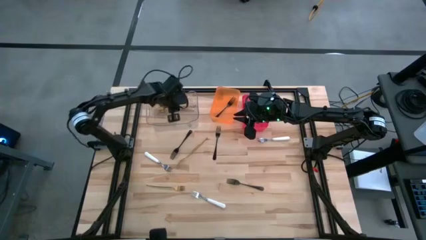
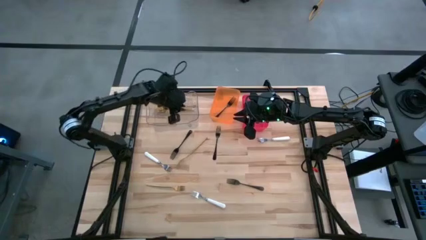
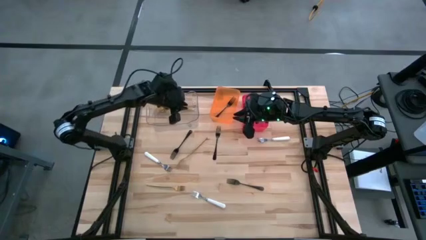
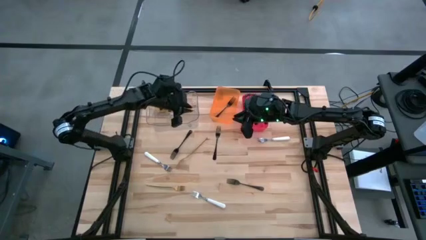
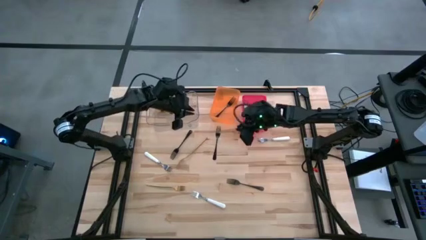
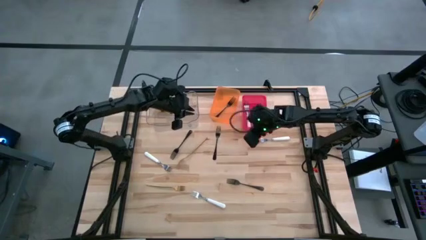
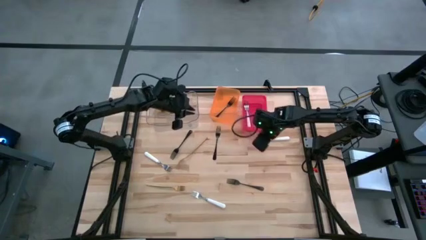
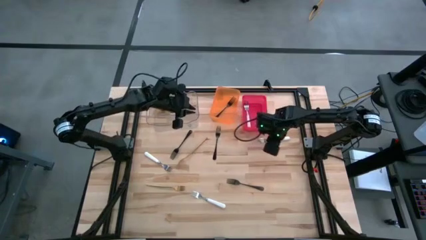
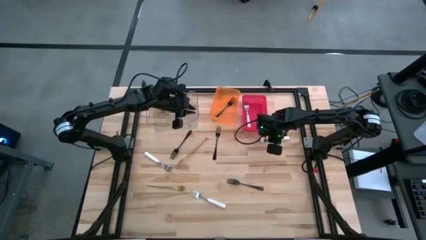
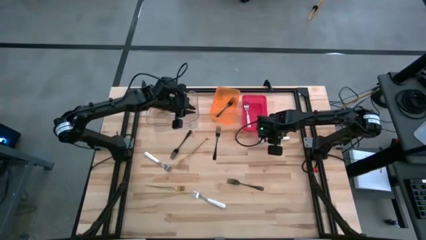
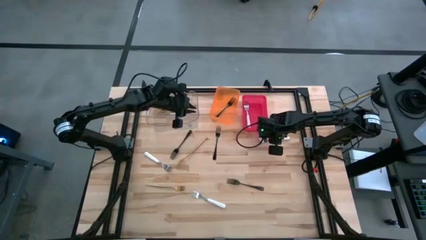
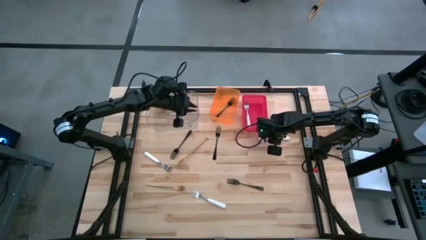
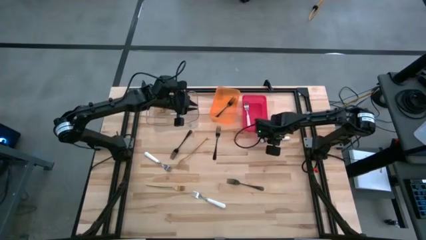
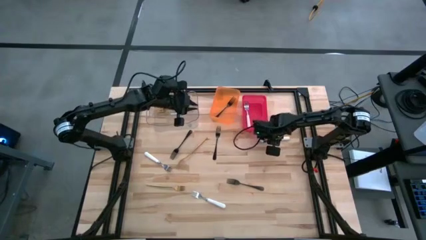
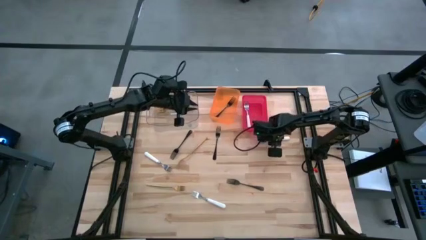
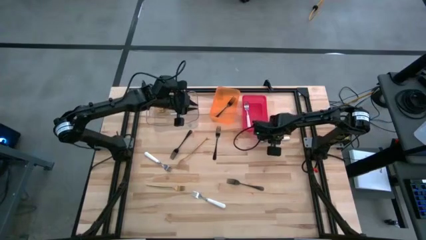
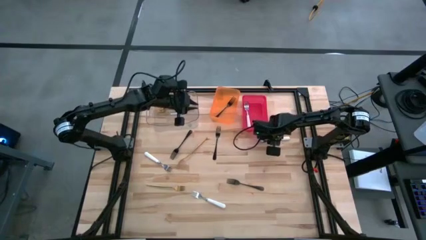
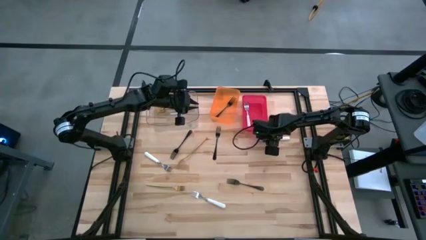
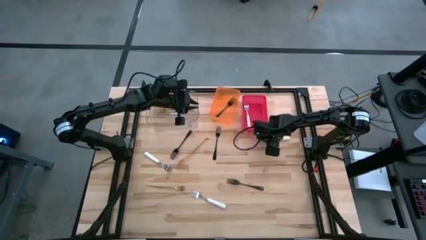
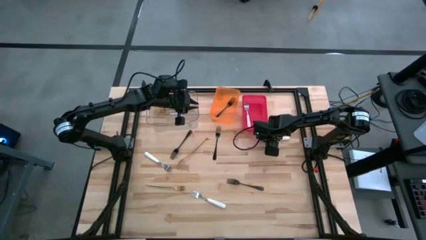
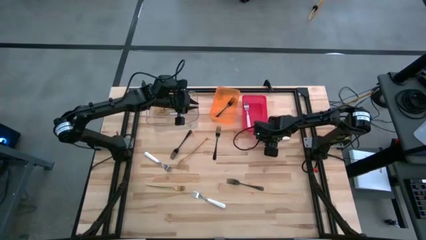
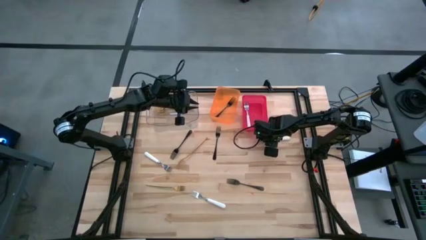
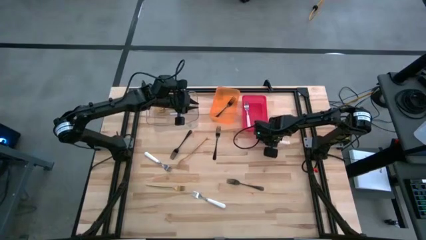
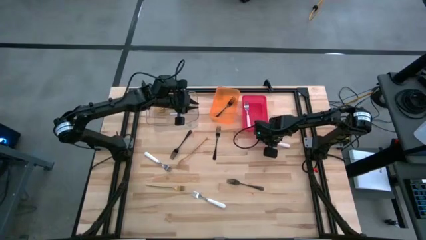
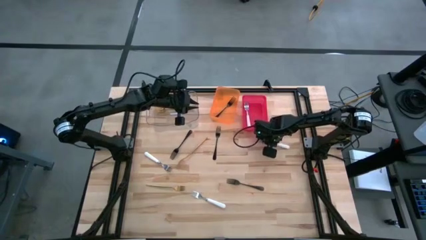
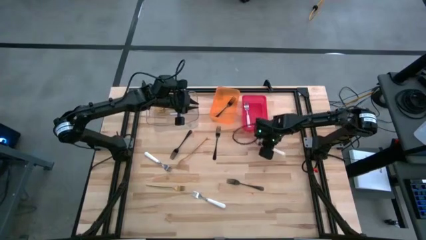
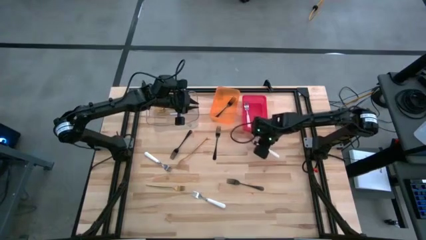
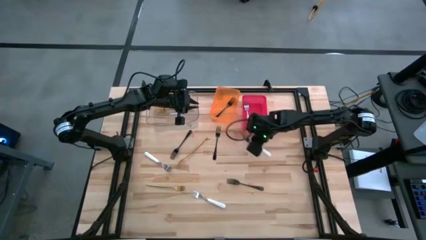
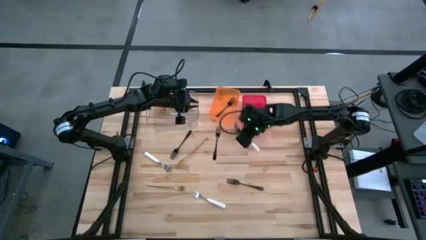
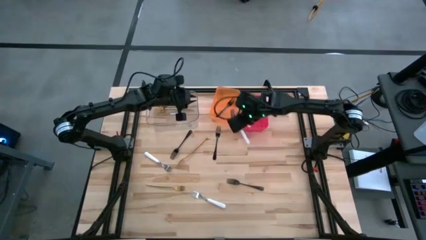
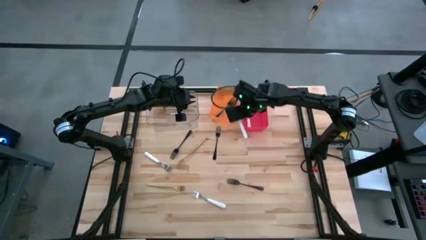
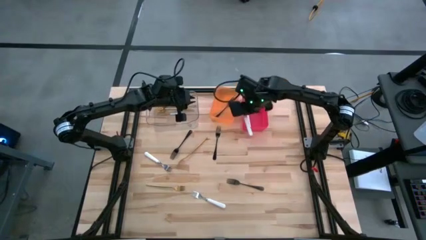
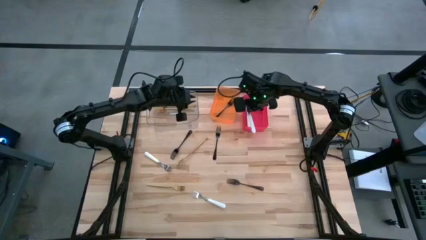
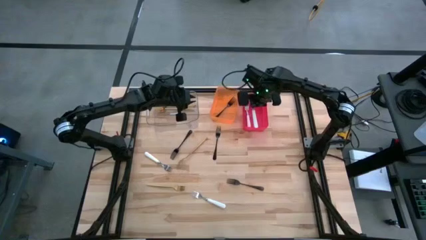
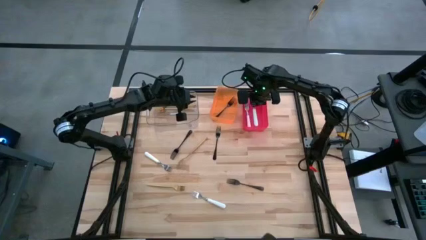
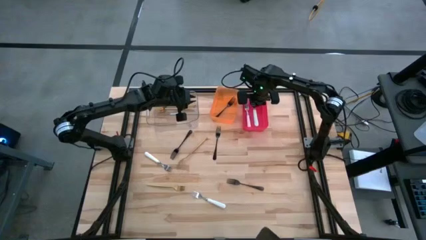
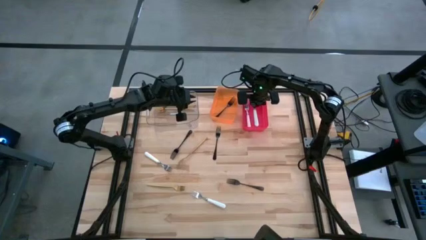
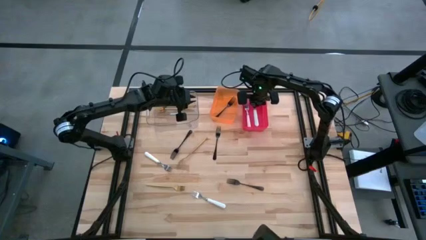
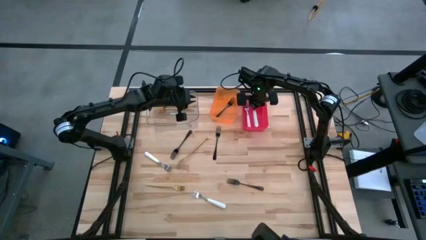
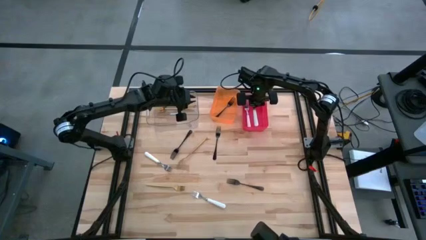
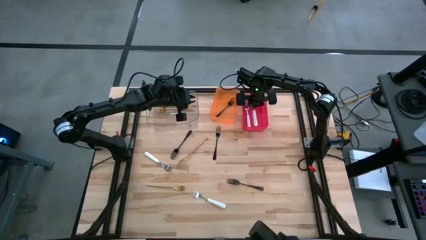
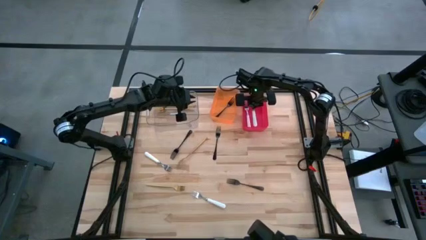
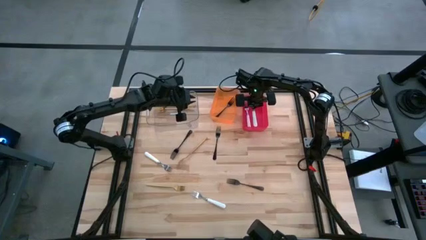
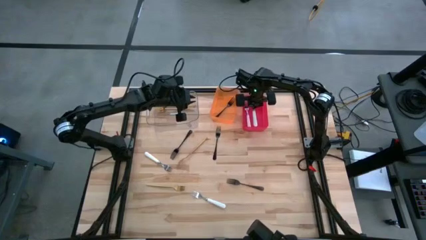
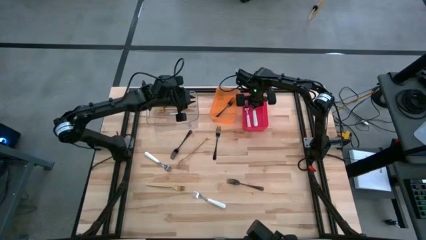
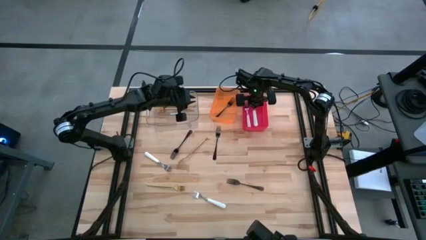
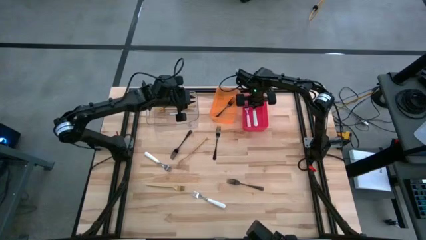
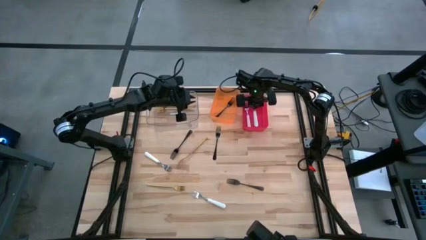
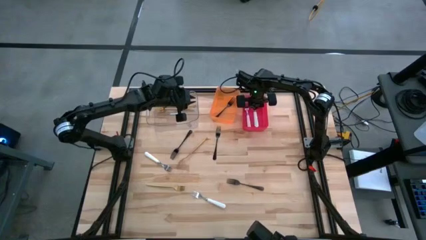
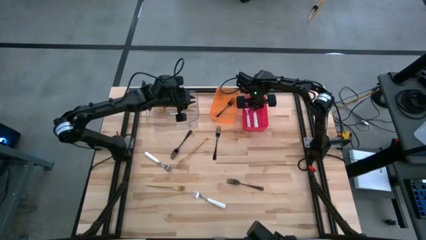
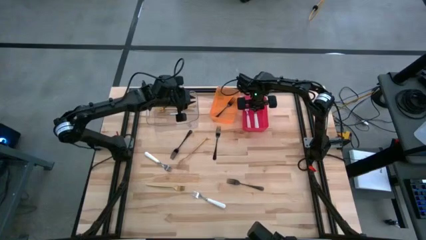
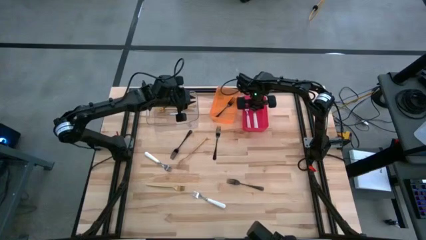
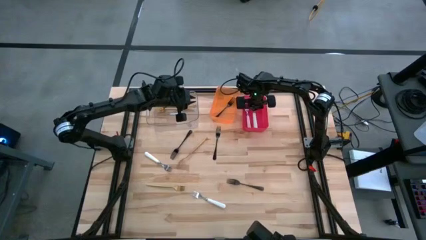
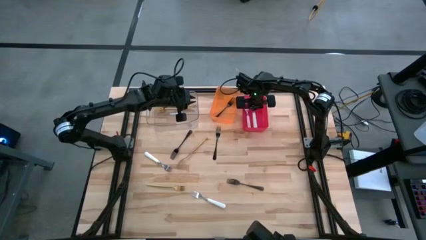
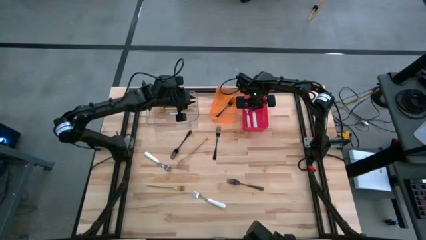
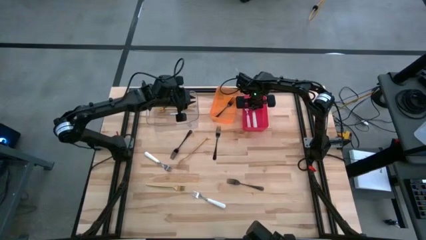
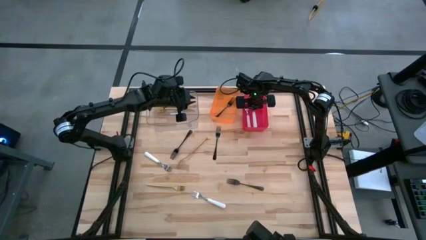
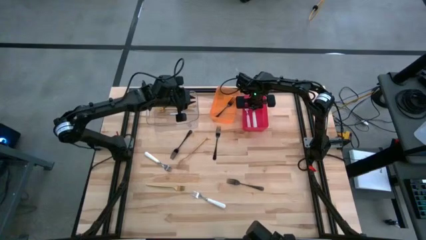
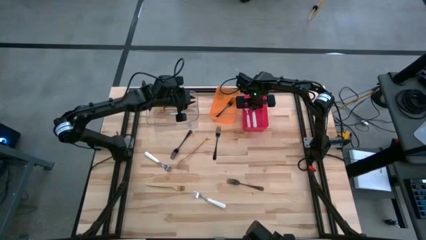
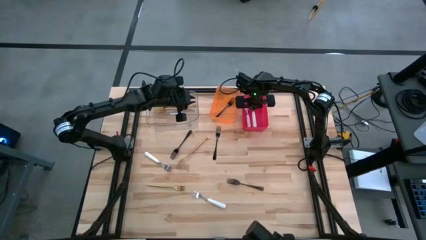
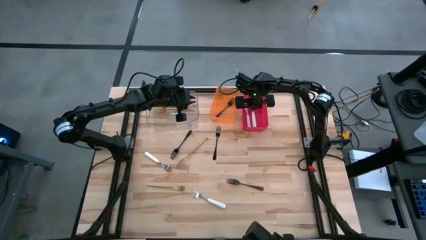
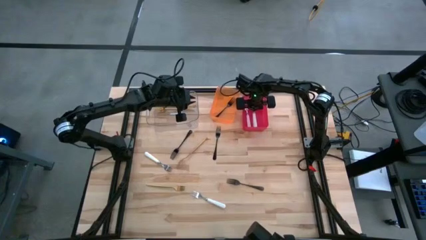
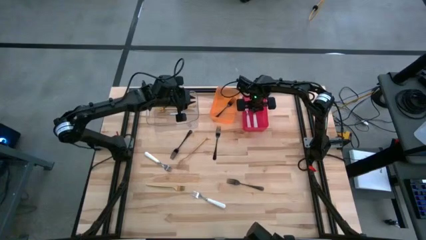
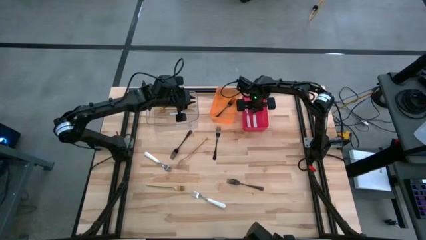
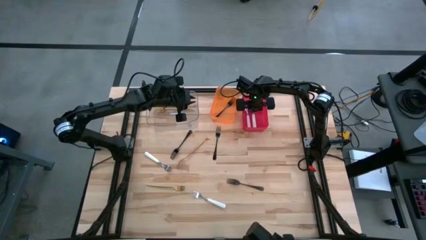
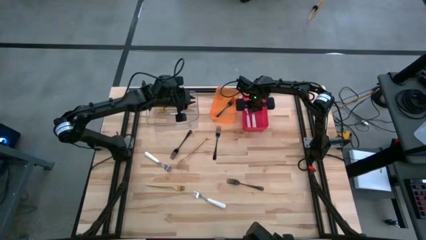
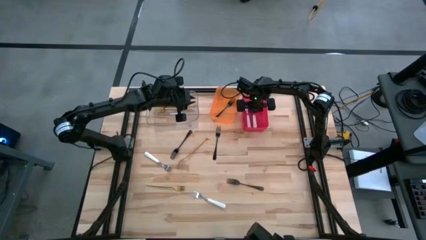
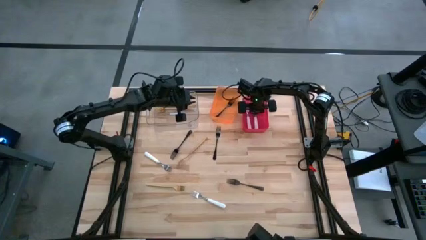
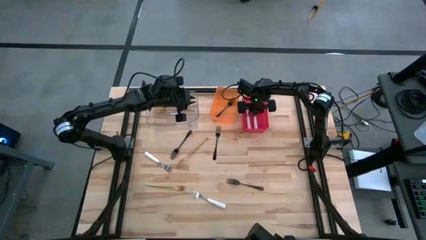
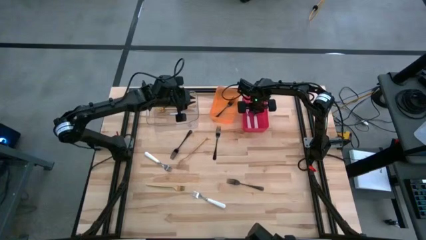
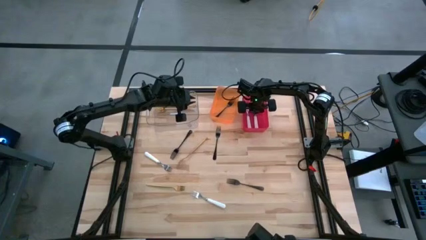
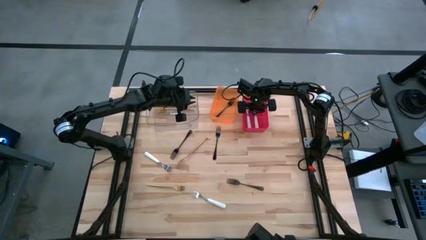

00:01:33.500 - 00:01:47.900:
Task: Sort silverware by color (type)
Put the white fork into the red bin
